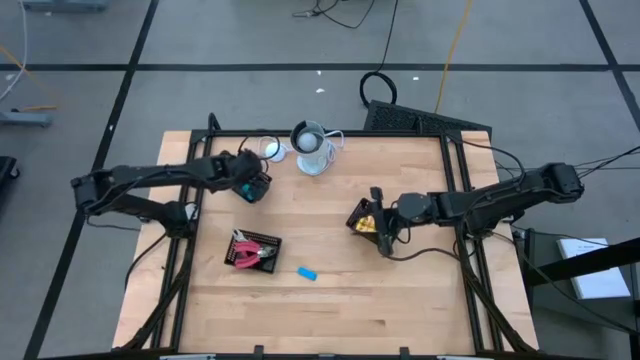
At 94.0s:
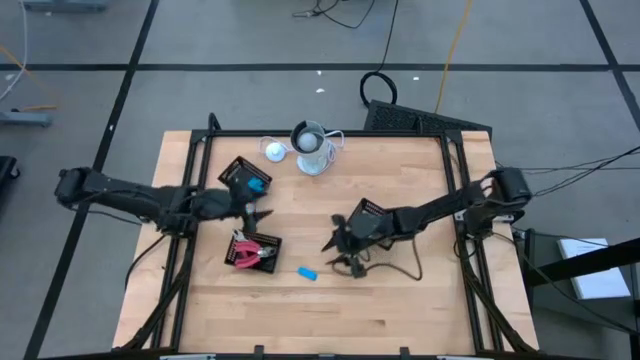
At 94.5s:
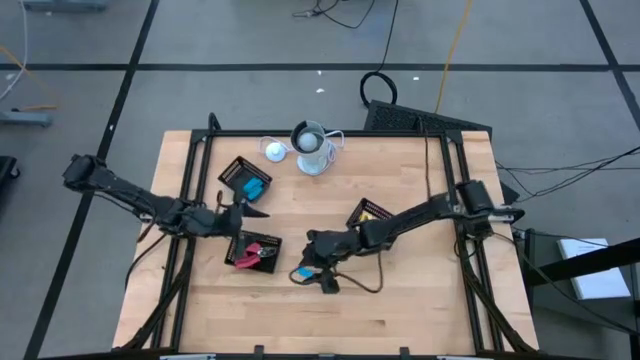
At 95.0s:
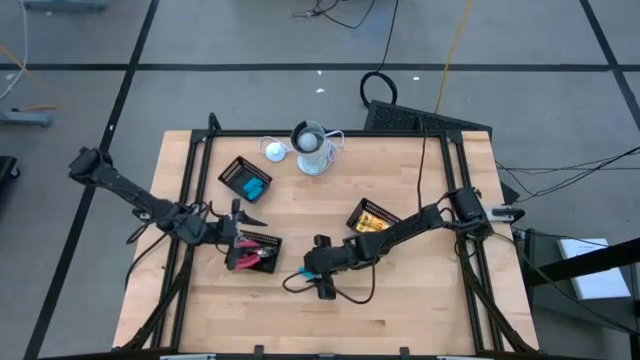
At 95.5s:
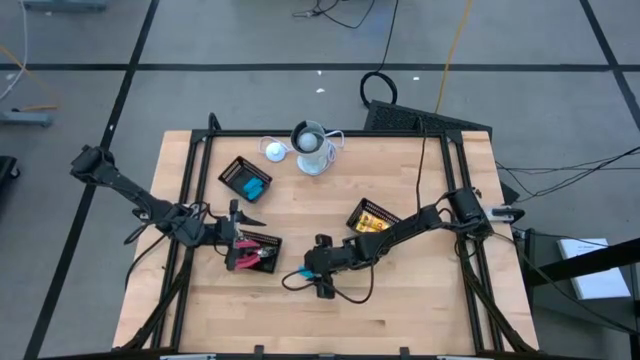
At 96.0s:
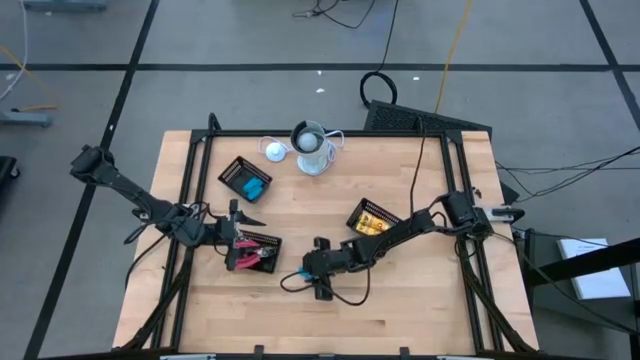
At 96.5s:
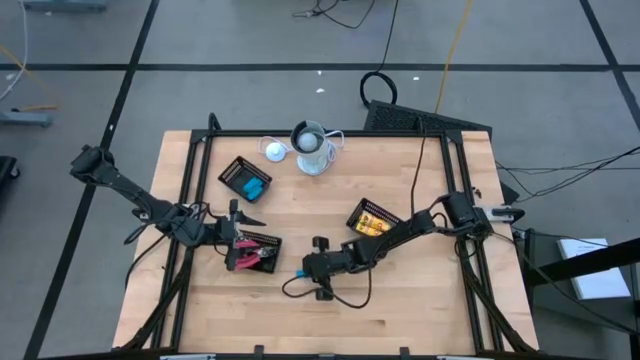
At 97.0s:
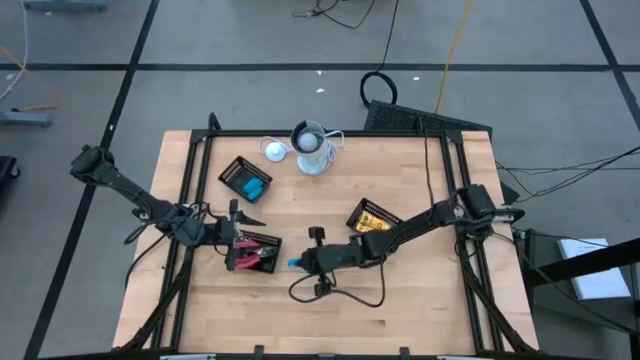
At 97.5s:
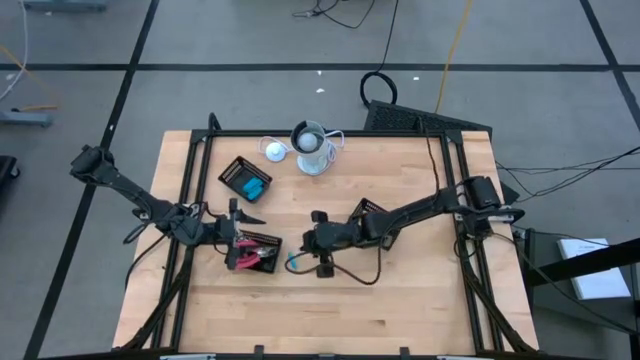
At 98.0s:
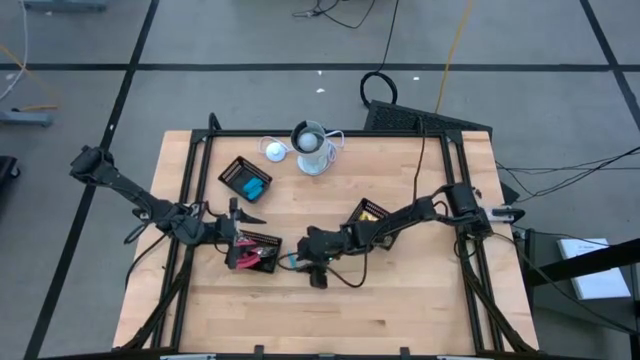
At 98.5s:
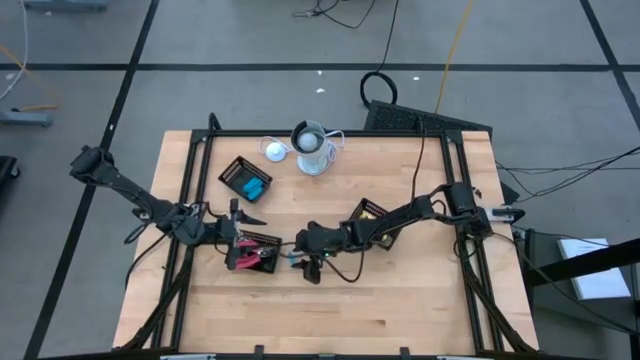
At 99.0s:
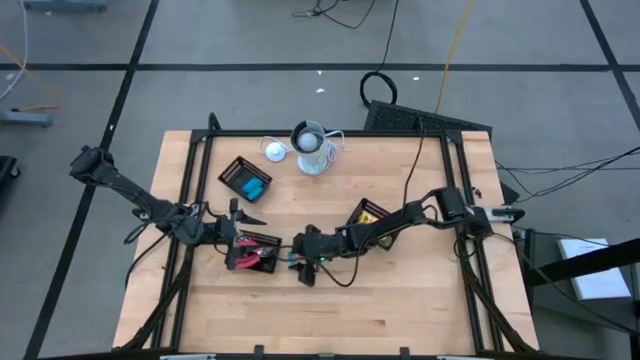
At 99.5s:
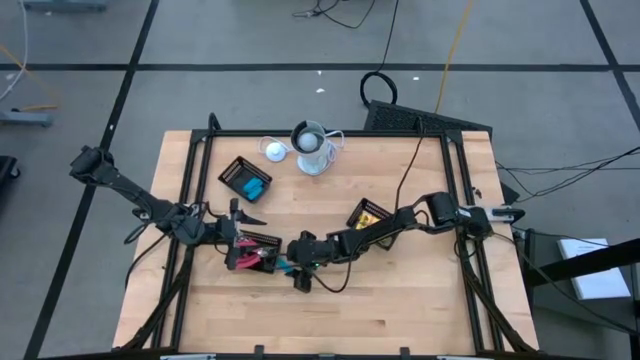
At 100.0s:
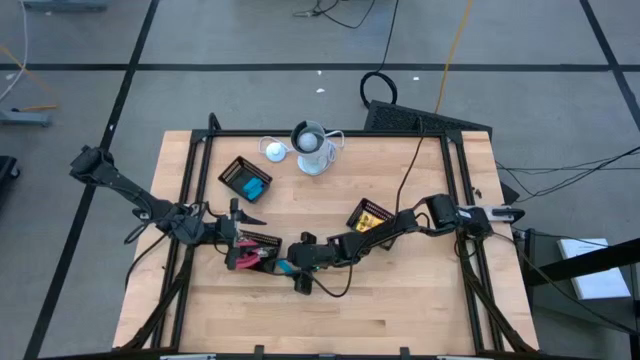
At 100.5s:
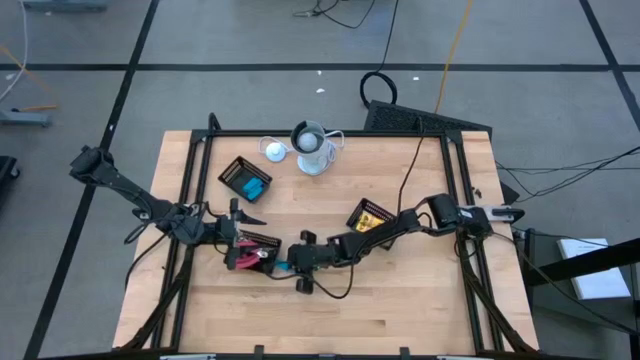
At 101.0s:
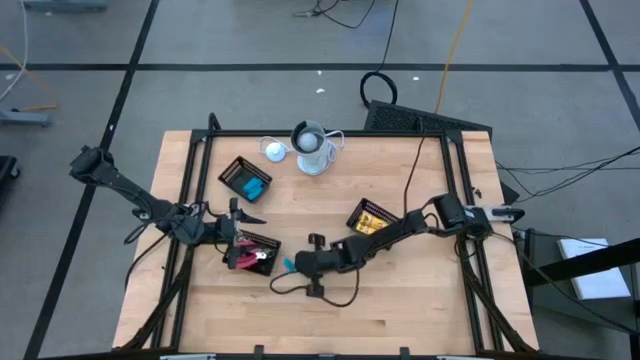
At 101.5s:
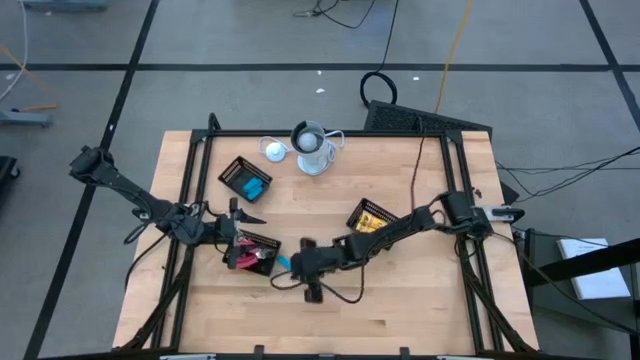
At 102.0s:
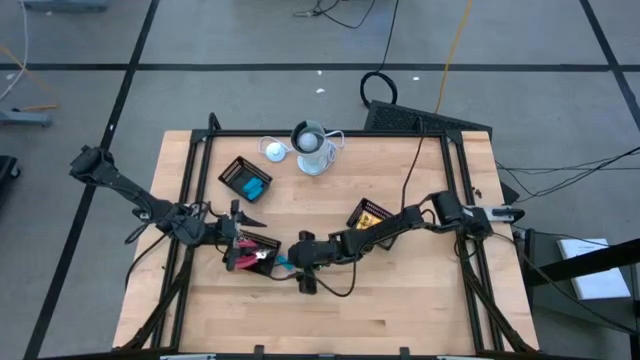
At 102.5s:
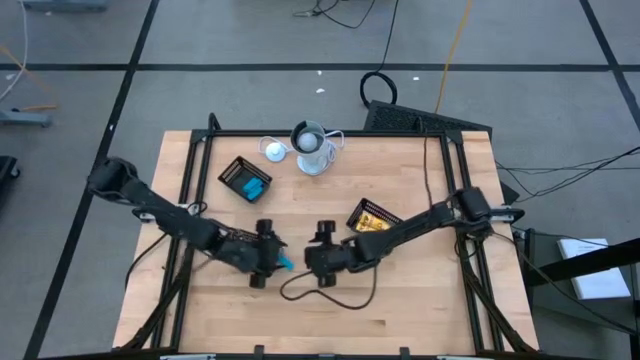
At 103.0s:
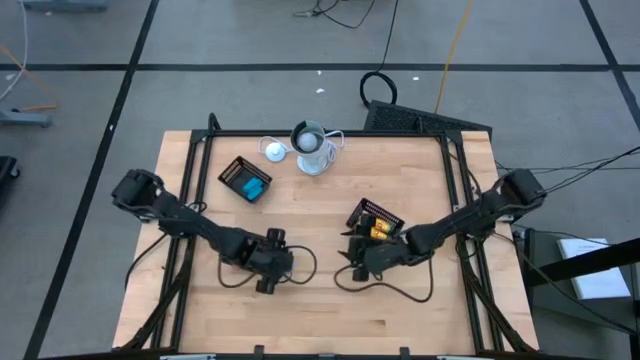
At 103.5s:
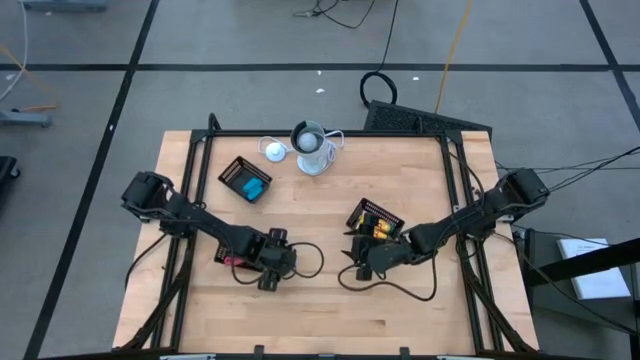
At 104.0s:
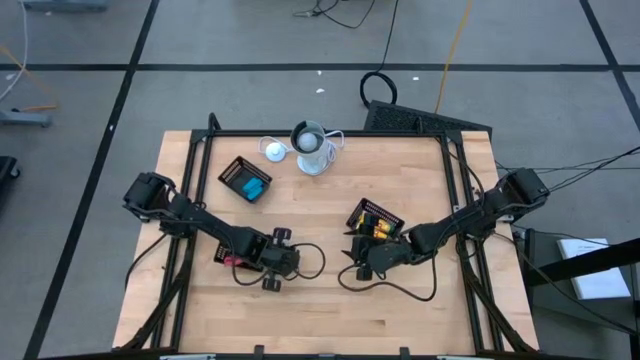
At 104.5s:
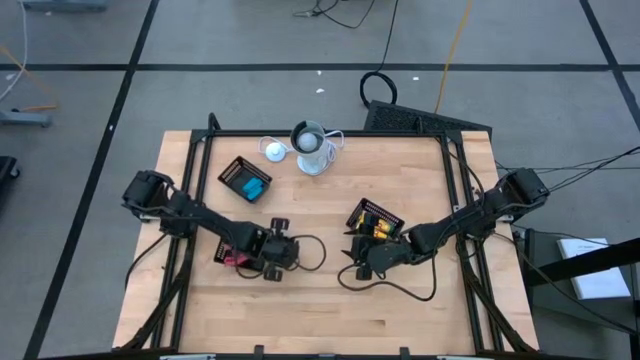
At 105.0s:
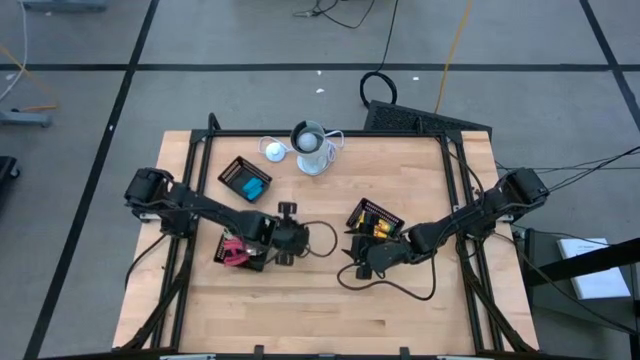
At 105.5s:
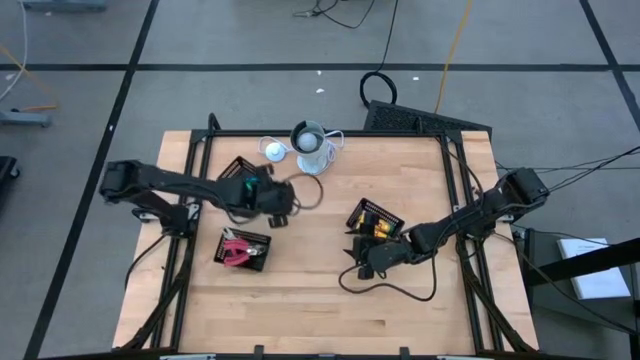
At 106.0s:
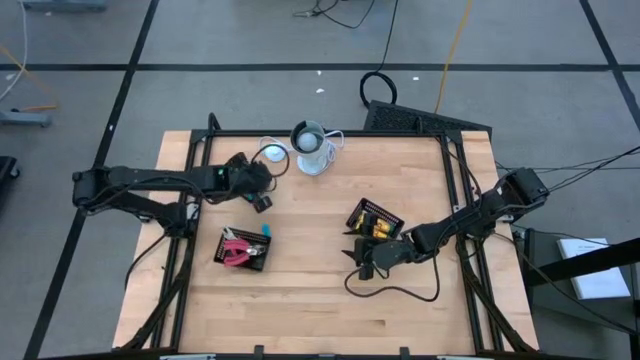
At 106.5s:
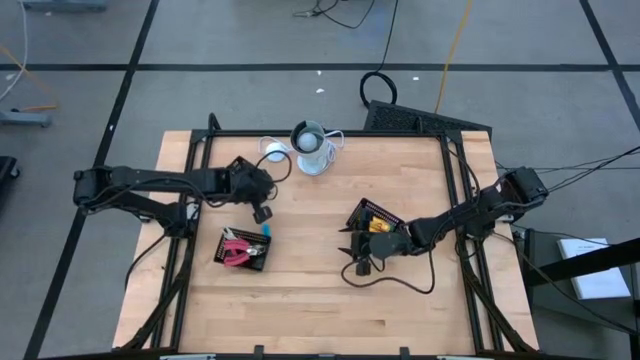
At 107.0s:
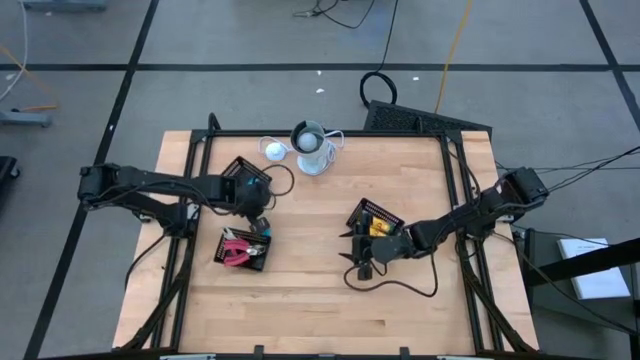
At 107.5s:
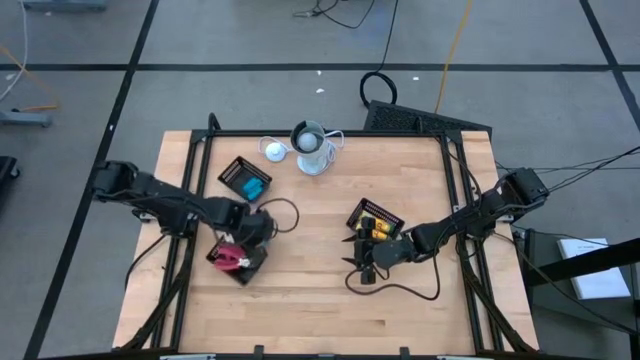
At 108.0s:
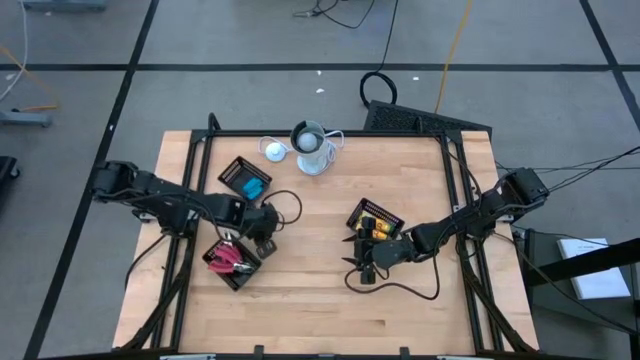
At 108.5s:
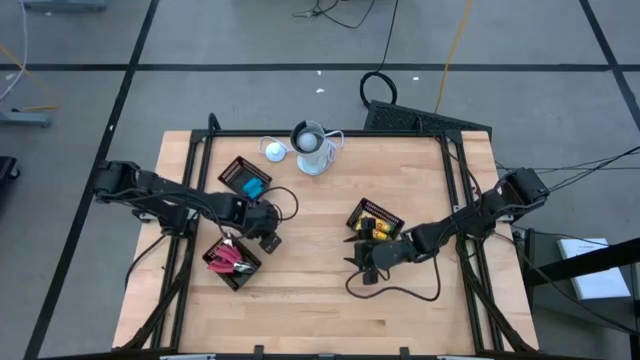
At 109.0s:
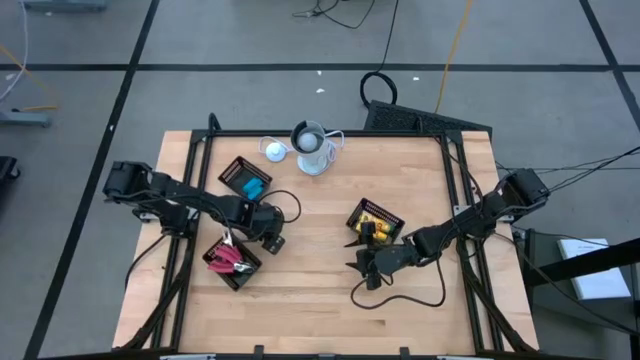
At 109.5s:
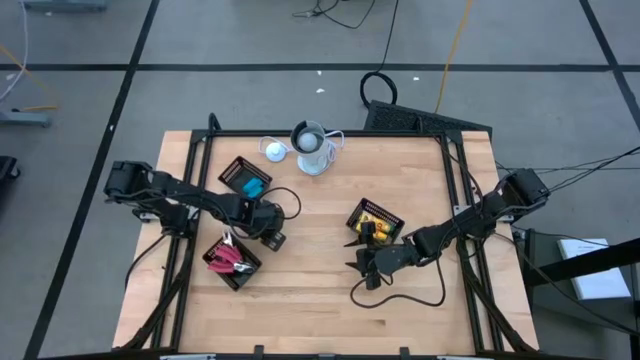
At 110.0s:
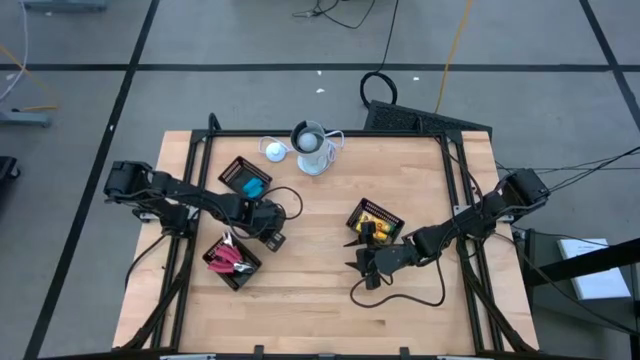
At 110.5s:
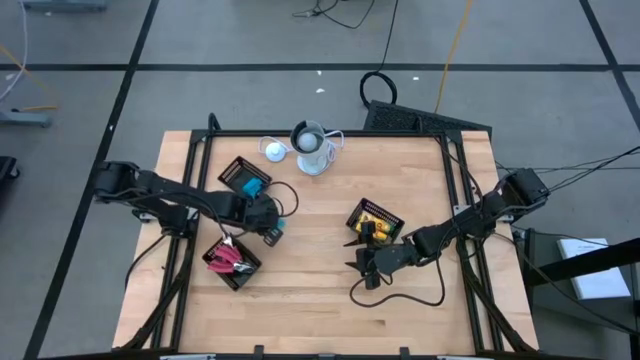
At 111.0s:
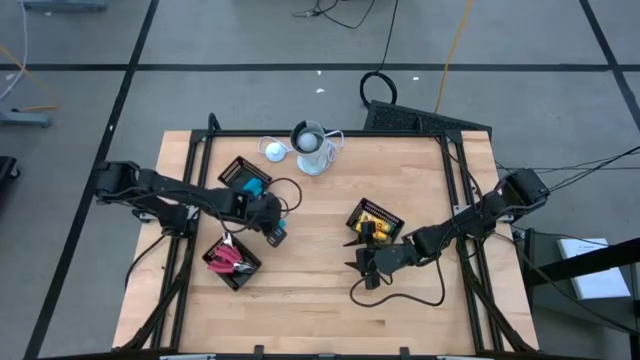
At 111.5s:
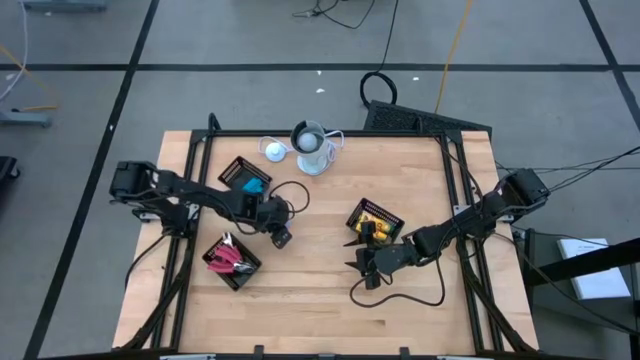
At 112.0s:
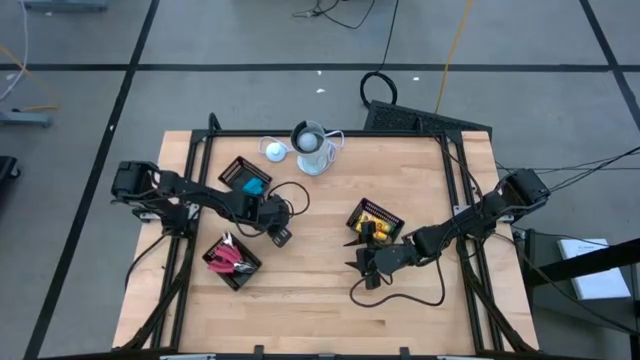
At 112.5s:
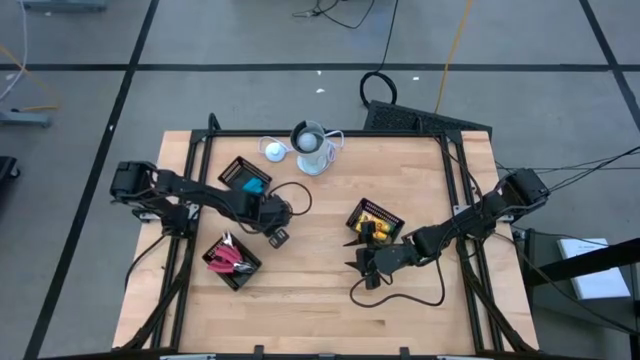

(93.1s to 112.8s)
Task: Pick & Place School Supplies
Put the blue eraser into the top black bin

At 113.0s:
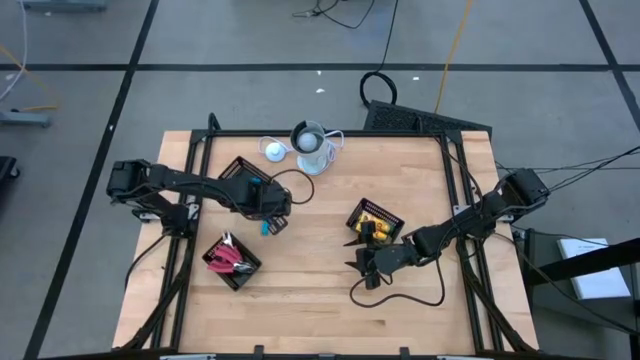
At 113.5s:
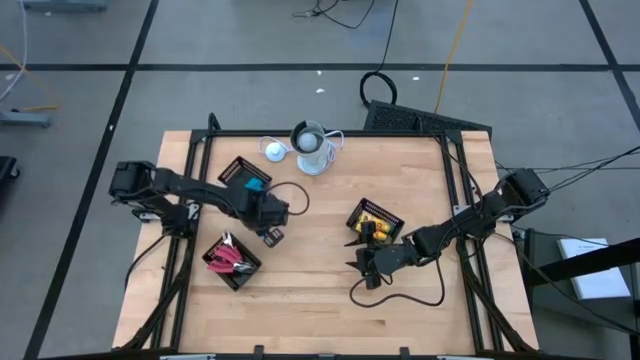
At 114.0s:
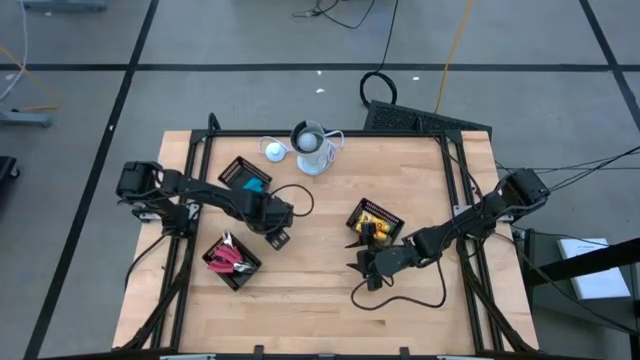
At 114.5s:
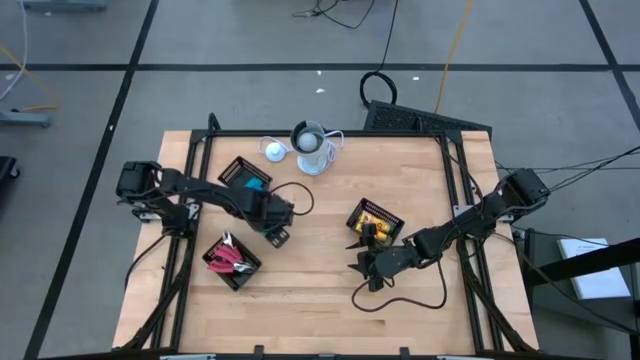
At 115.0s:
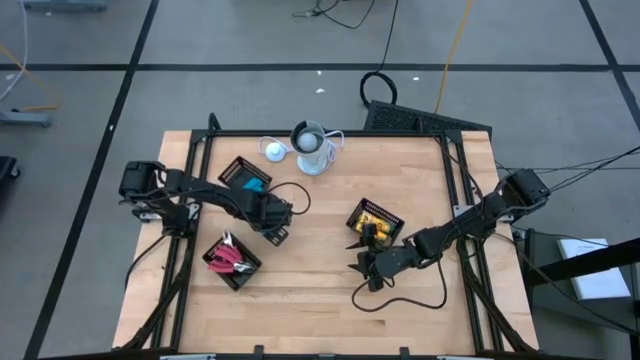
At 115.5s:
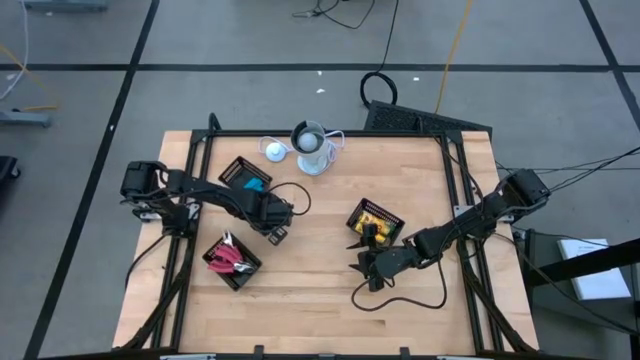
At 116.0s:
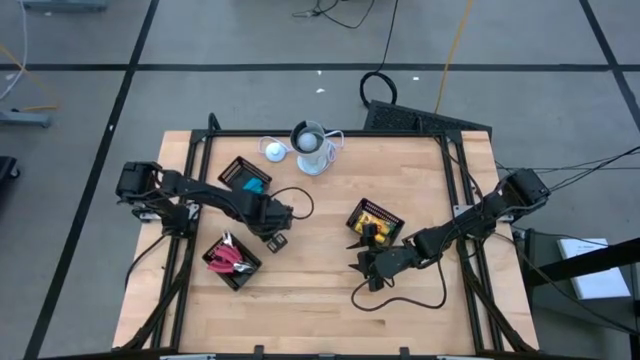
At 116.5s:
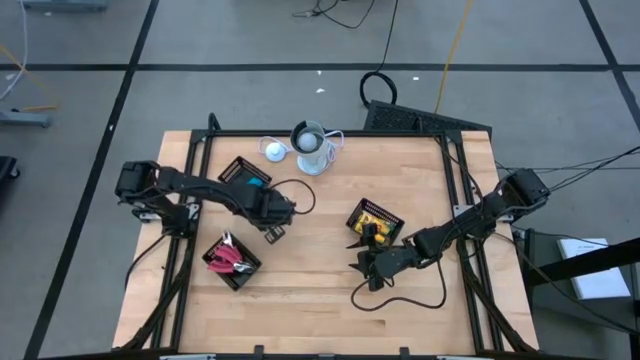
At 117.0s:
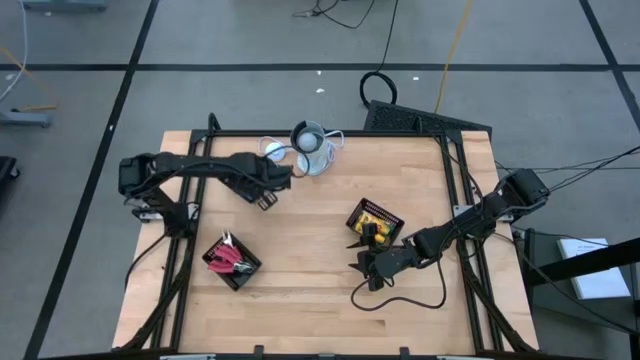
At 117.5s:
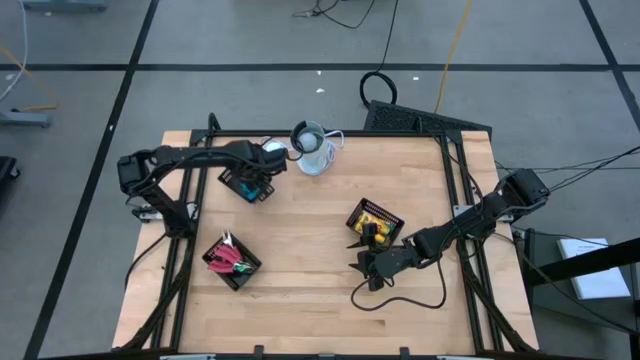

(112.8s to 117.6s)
Put the blue eraser into the top black bin
